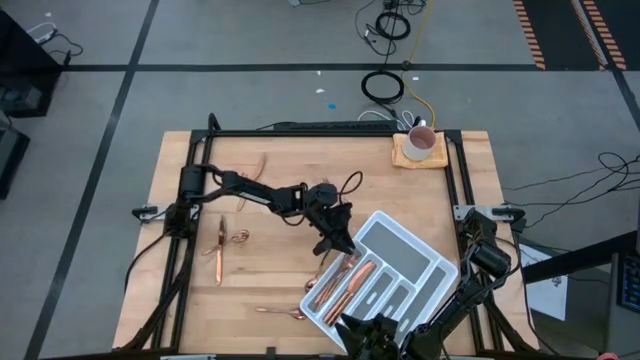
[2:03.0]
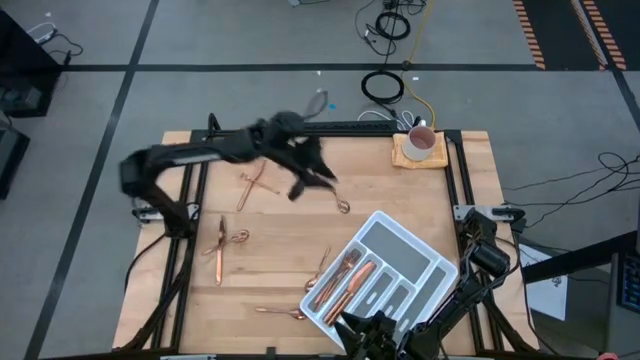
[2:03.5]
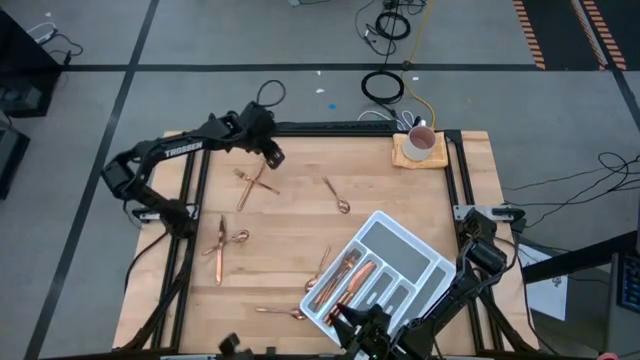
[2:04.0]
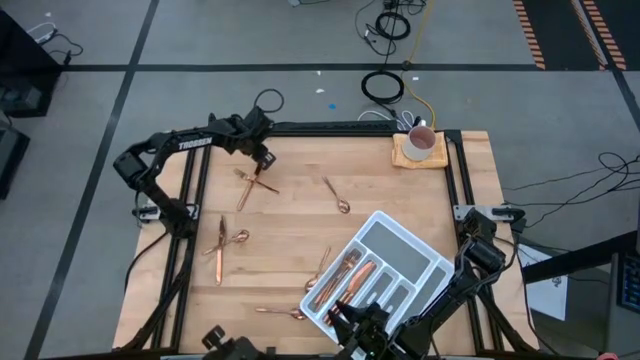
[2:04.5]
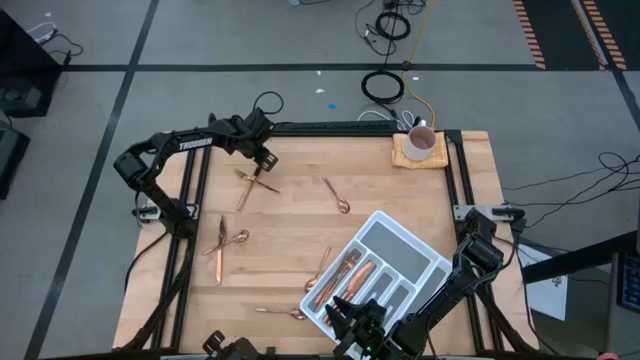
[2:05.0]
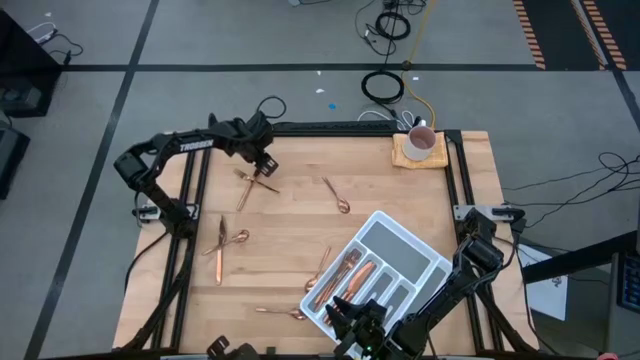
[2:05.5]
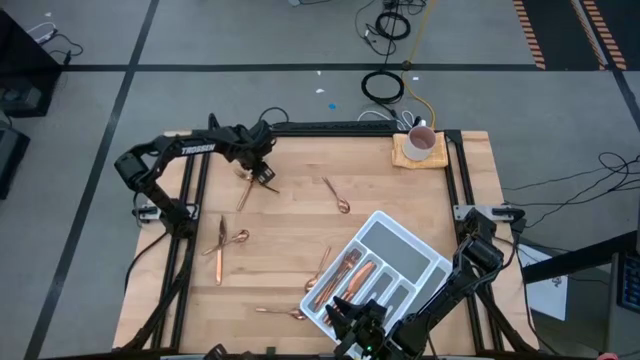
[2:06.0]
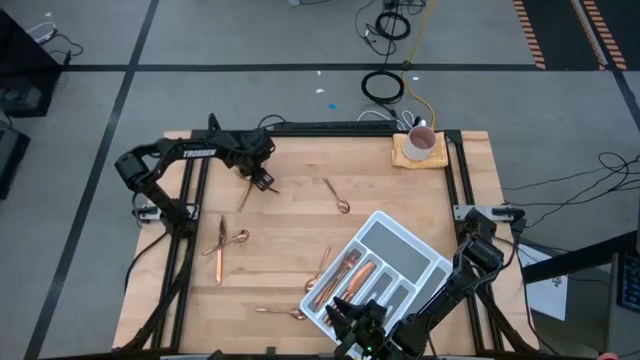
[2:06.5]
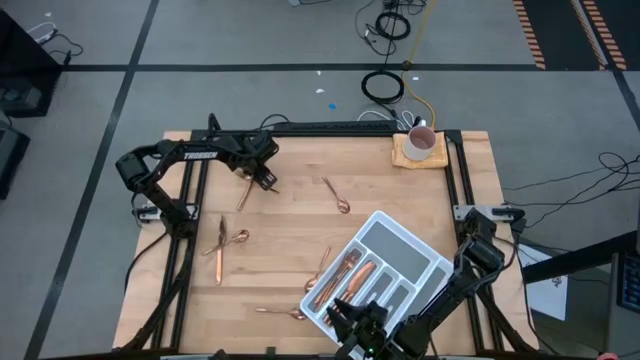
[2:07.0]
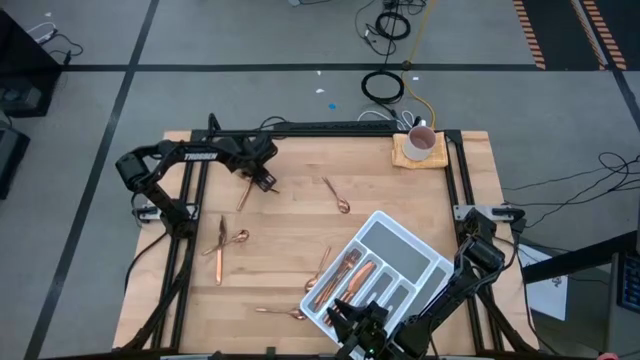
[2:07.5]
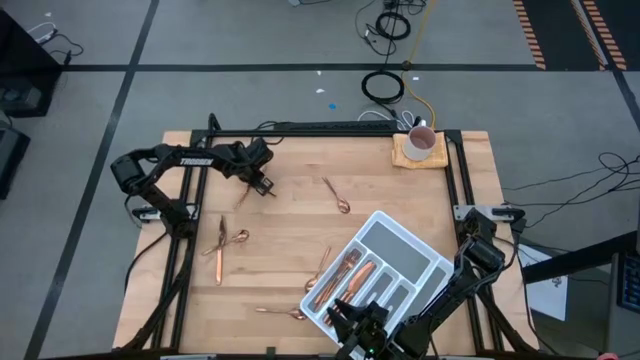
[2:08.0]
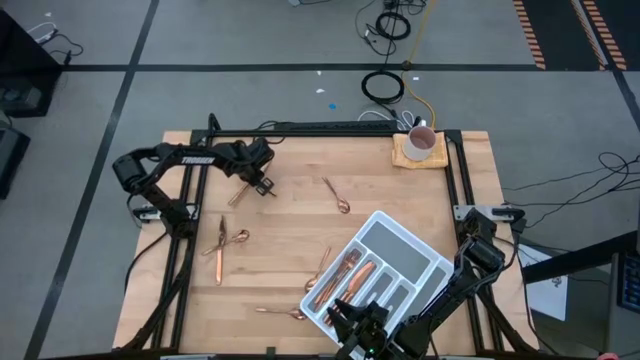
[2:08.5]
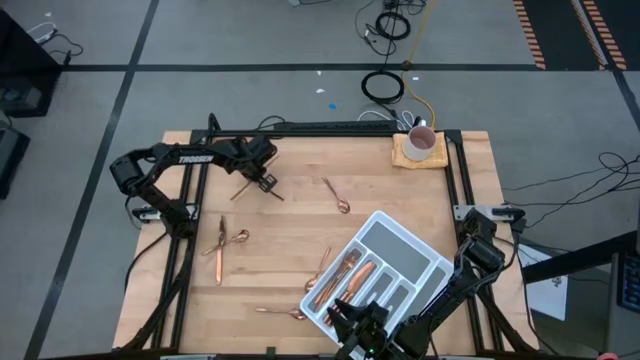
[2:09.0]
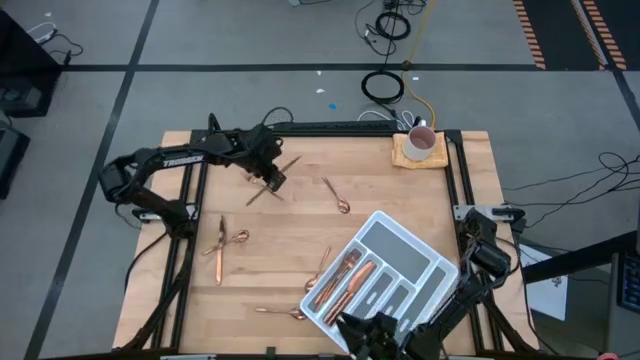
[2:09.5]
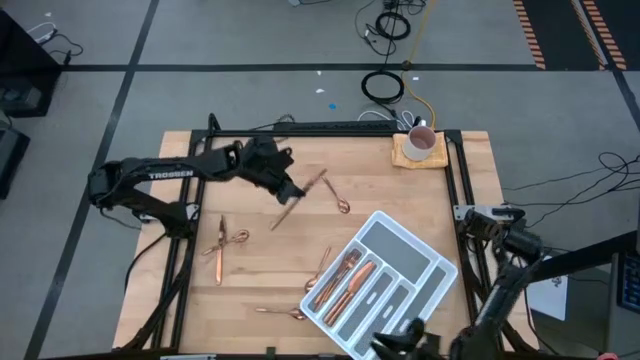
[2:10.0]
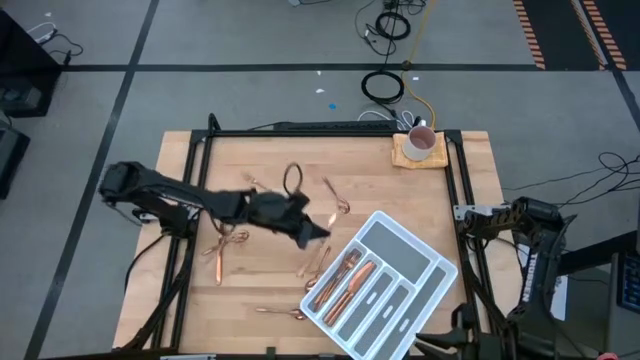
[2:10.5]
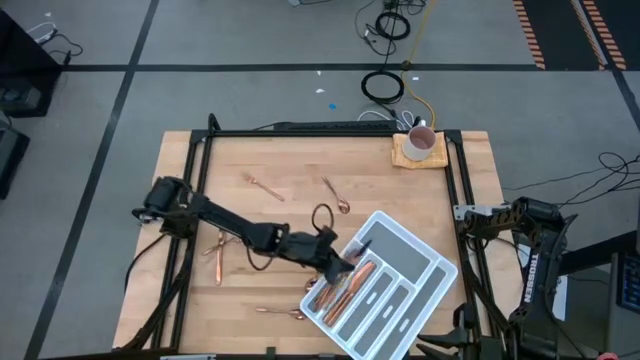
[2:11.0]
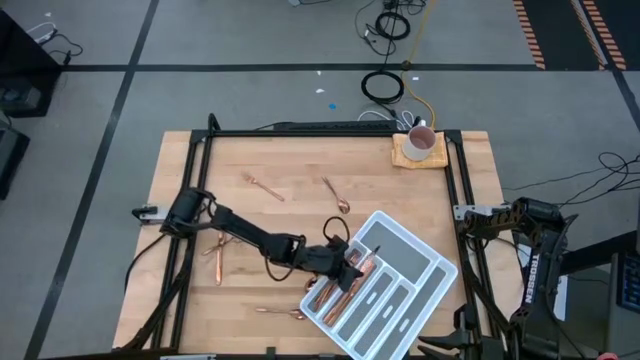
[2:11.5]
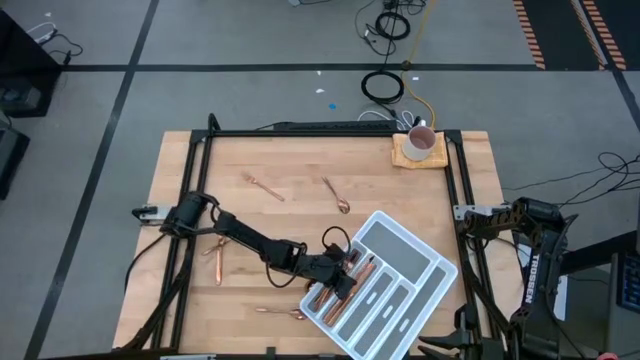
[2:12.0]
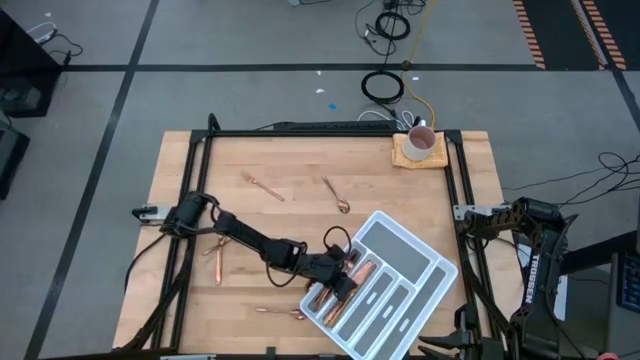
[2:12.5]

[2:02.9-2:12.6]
Task: Sort silverware
Put the gold knife into the silverware tray

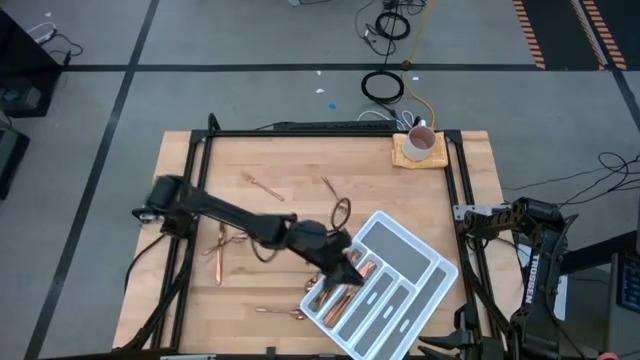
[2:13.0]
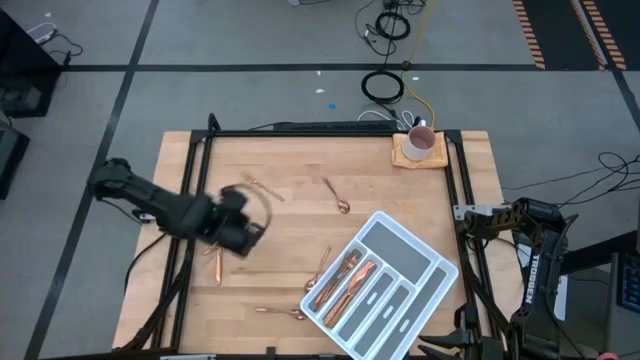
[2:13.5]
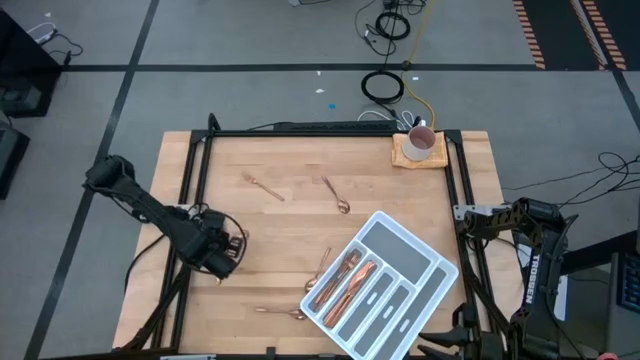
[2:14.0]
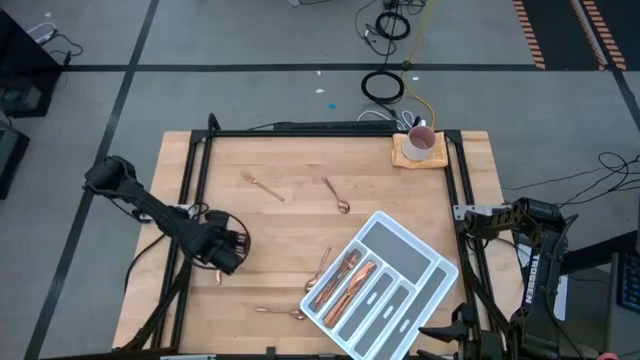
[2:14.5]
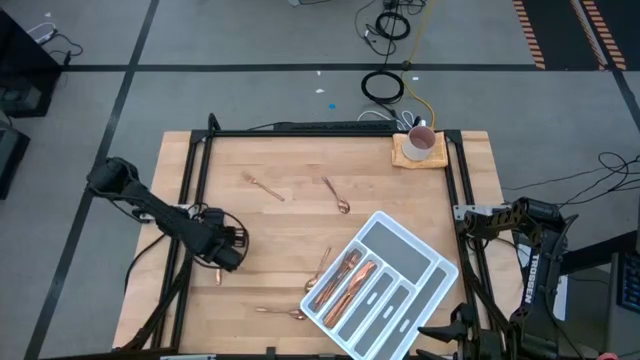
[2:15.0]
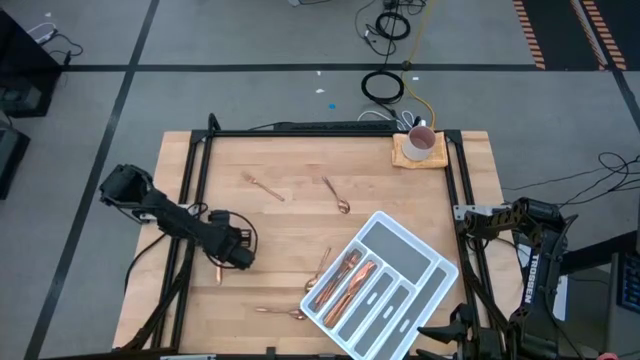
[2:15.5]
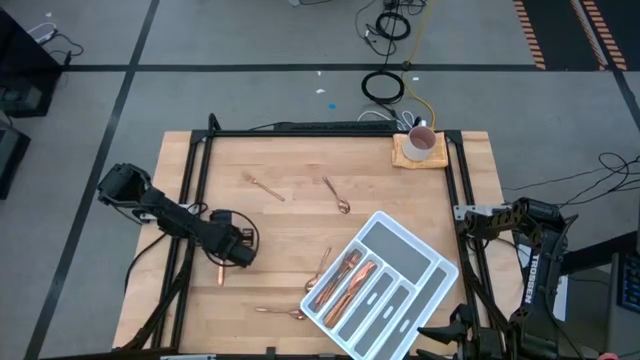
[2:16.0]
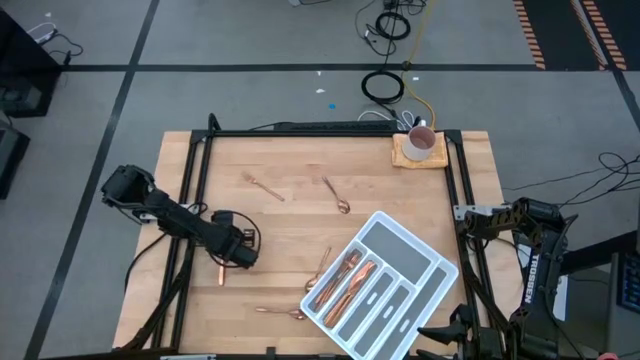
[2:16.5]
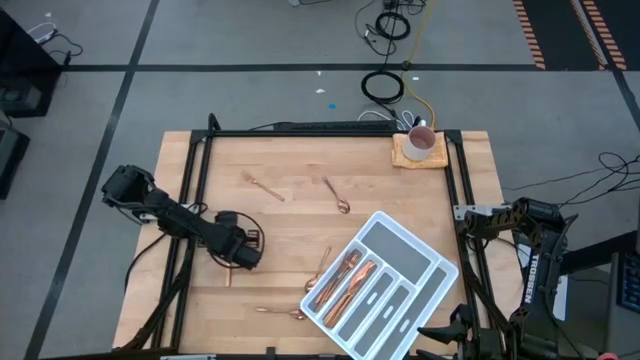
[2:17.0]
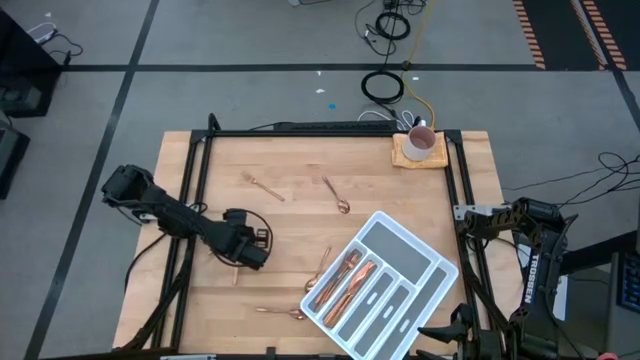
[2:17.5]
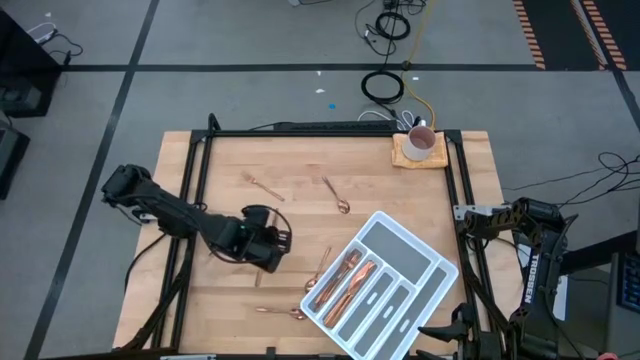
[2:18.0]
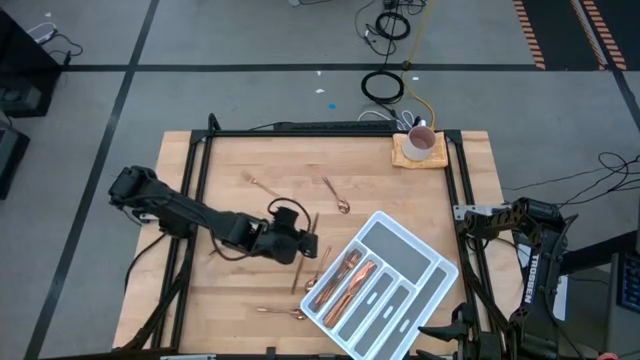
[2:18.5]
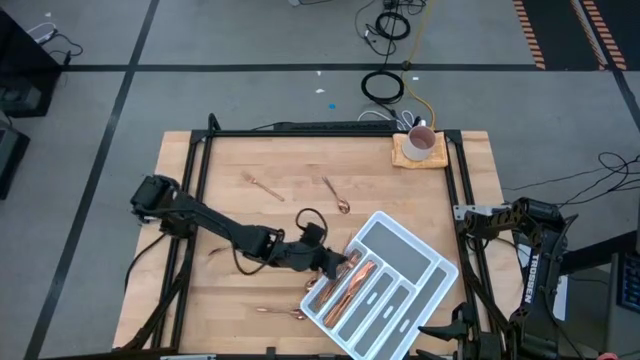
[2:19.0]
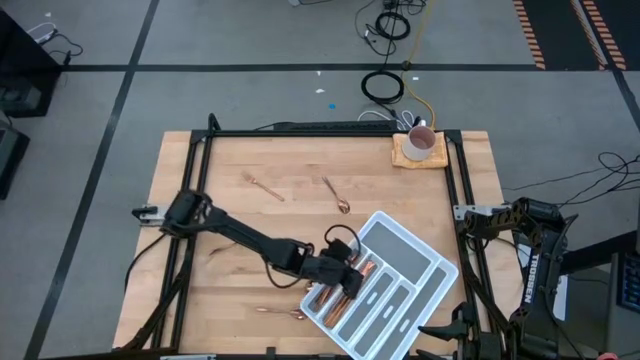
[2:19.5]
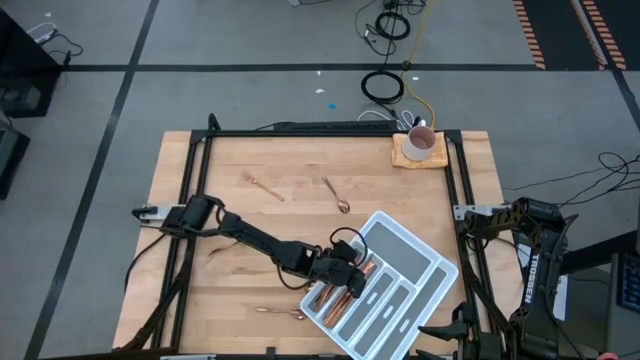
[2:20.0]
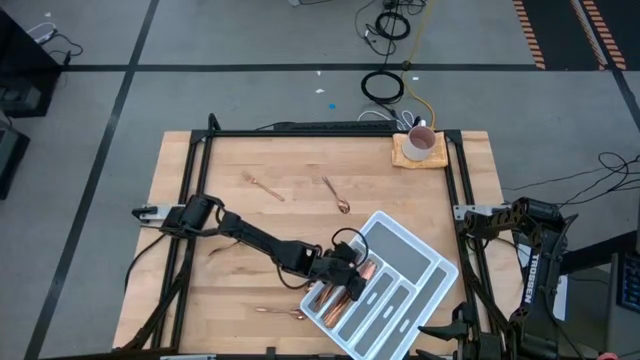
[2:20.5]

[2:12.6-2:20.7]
Put the gold knife into the silverware tray
